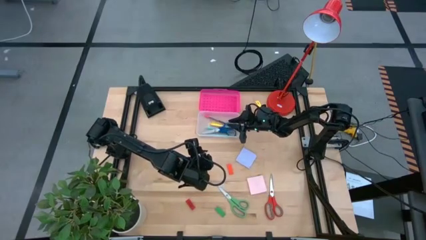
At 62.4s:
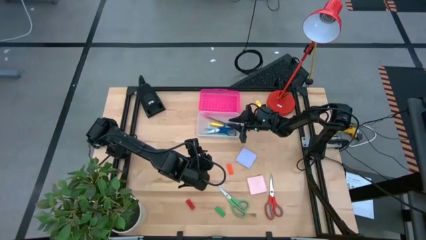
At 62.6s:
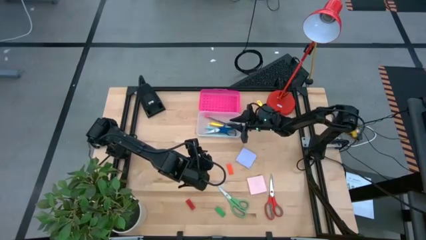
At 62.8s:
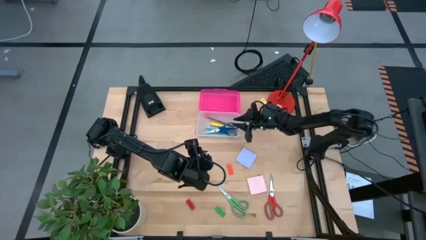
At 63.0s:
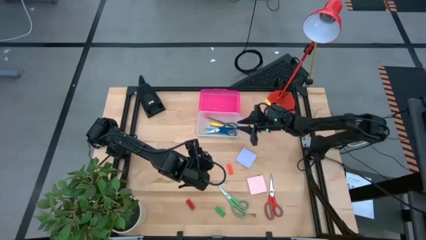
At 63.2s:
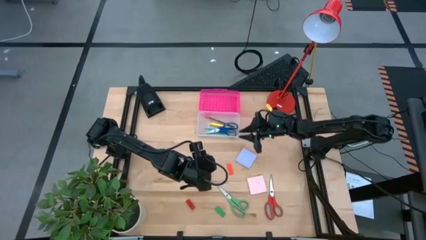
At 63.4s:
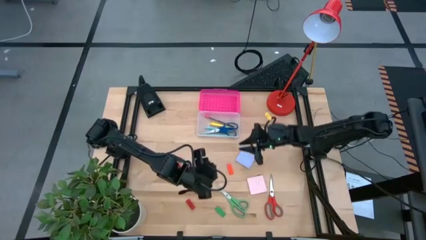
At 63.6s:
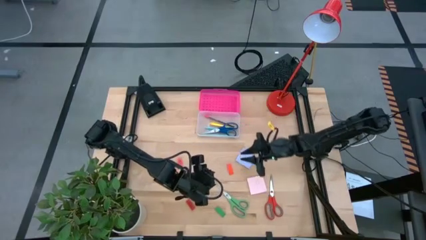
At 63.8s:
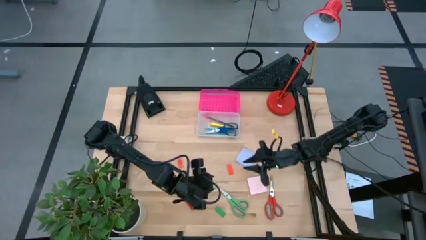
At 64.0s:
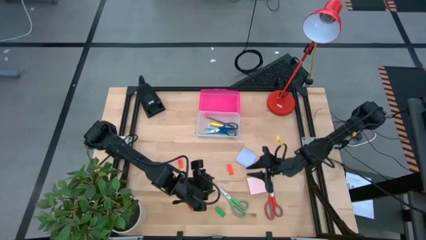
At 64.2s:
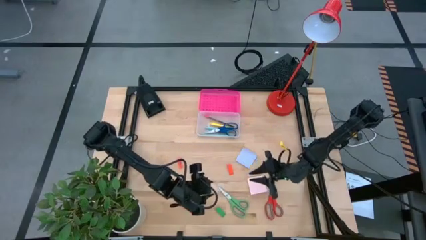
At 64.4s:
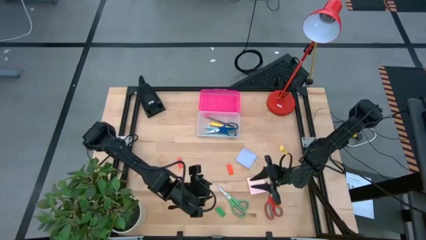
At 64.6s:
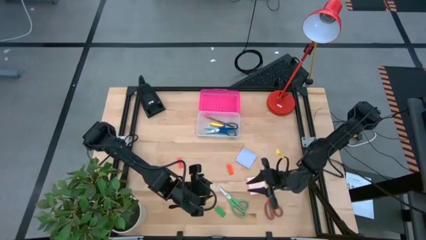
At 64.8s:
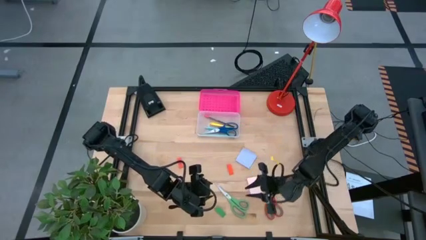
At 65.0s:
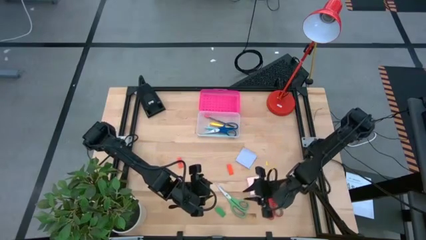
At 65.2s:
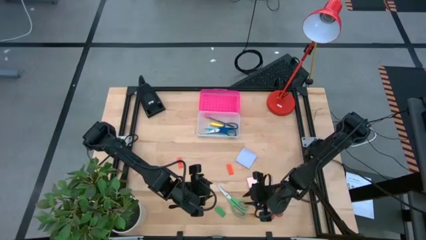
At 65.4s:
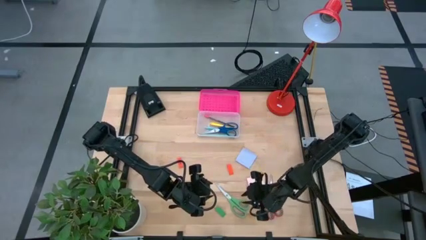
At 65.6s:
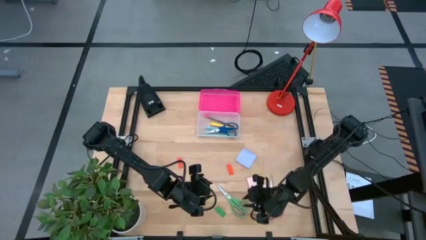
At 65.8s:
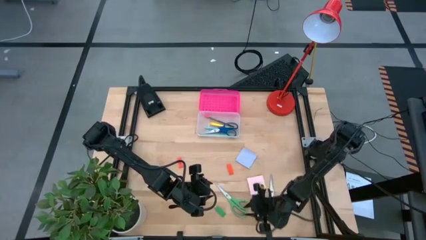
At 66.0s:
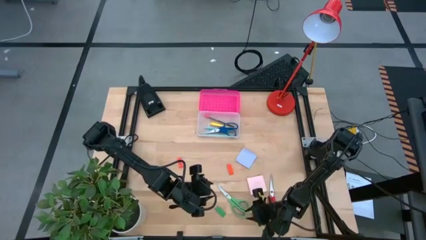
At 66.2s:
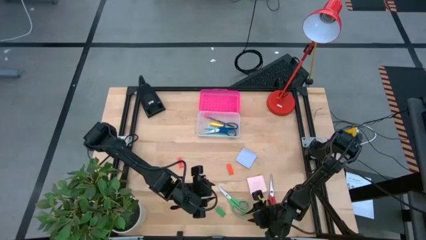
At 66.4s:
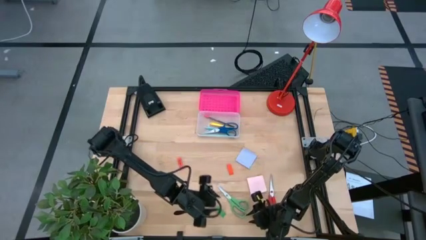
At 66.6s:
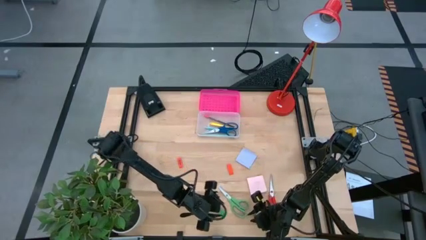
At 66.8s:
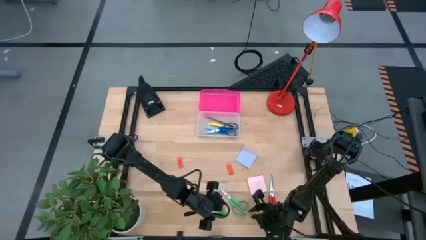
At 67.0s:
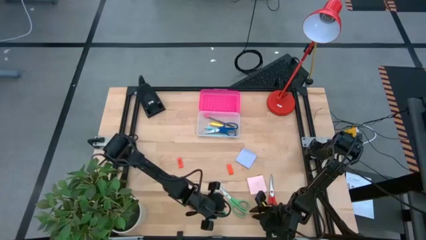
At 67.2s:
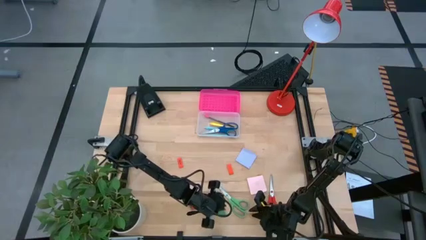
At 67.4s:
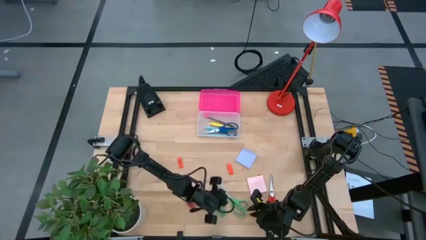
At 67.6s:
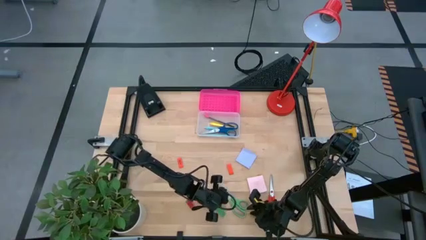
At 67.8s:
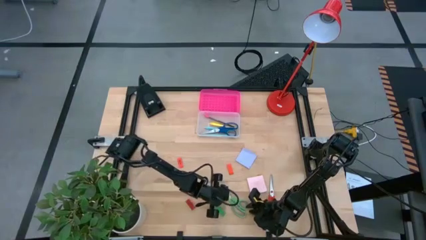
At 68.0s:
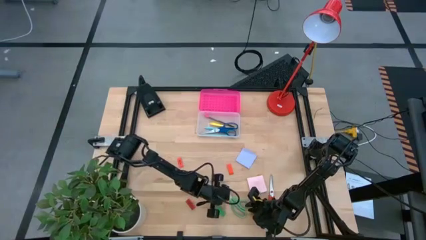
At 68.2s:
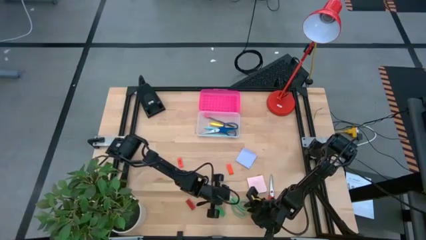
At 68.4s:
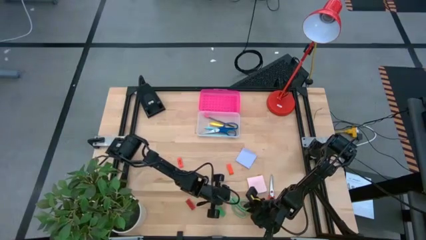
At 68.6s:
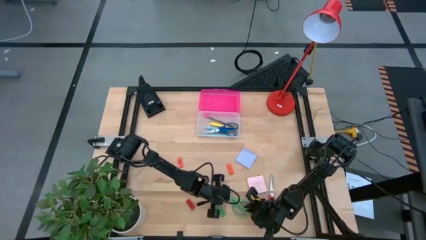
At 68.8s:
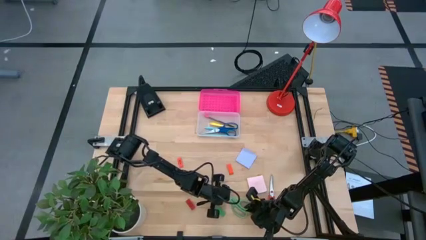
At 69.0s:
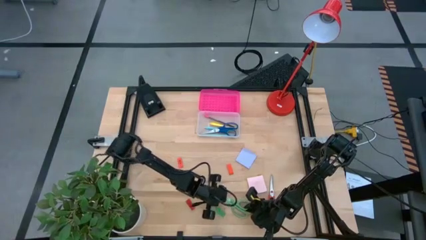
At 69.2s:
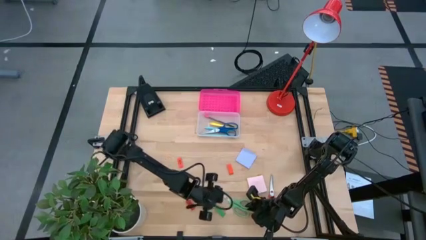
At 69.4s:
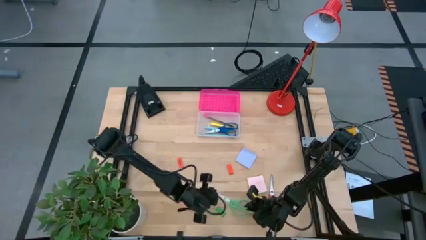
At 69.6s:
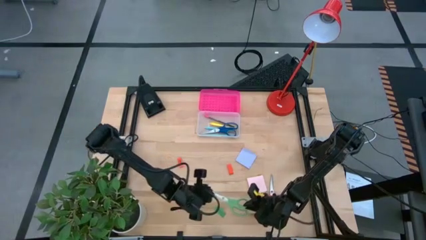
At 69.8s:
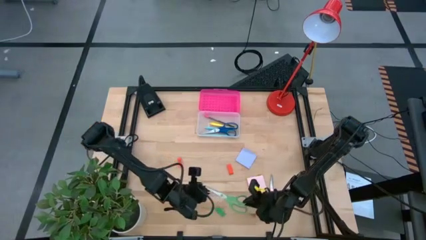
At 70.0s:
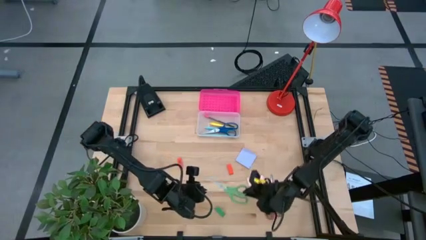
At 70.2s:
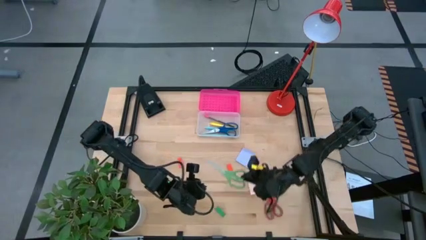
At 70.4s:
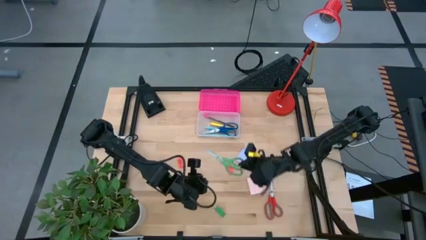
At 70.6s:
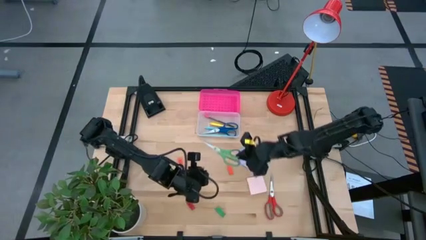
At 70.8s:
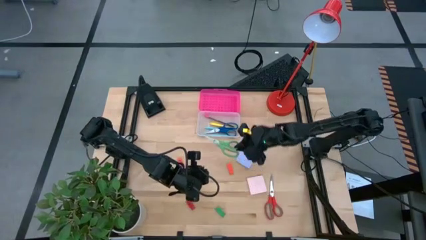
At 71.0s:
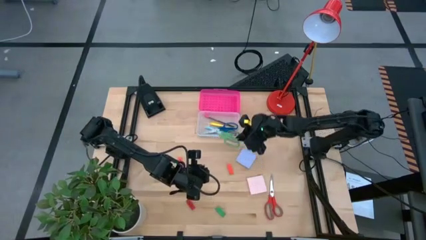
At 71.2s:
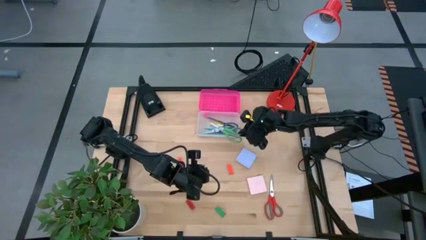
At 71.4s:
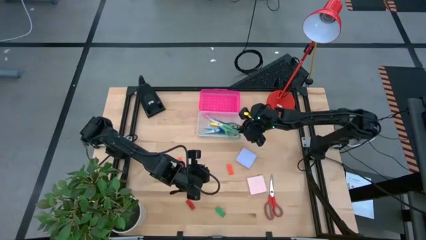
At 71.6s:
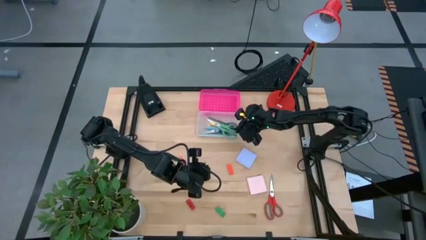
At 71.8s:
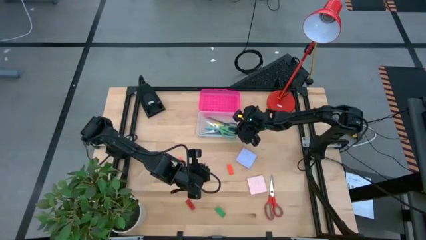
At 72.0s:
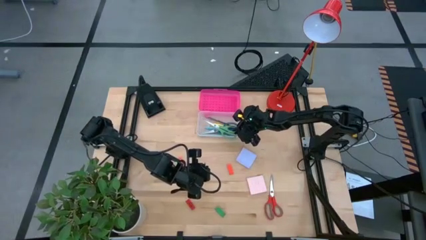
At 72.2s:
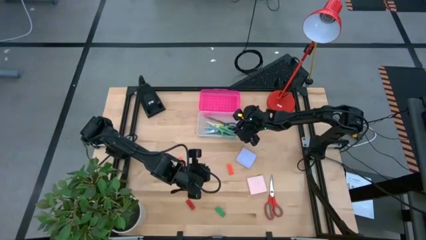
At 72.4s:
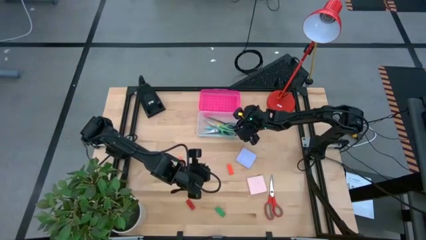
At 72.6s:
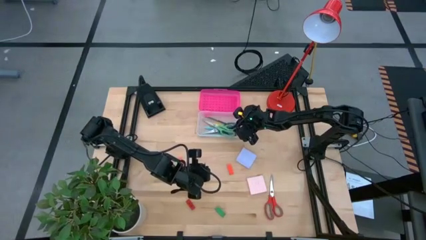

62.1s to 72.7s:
Task: Pack school essentials
Put the green scissors into the supply box

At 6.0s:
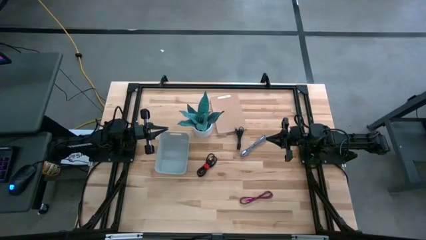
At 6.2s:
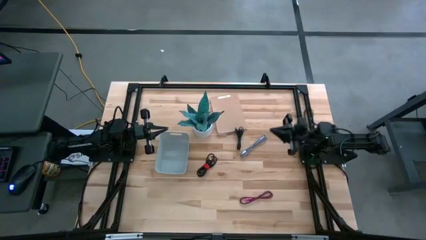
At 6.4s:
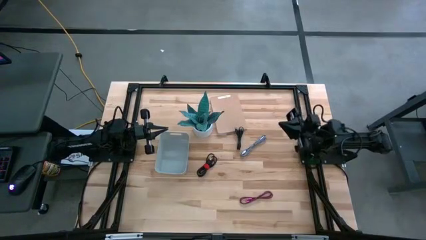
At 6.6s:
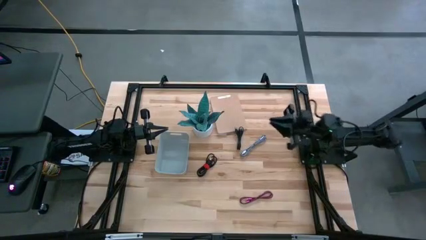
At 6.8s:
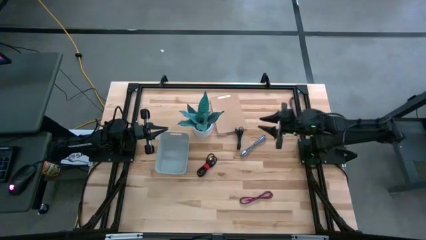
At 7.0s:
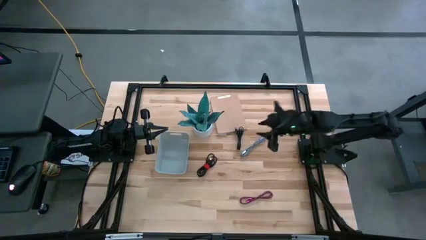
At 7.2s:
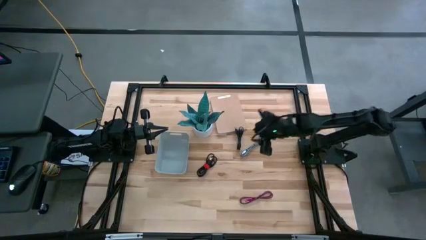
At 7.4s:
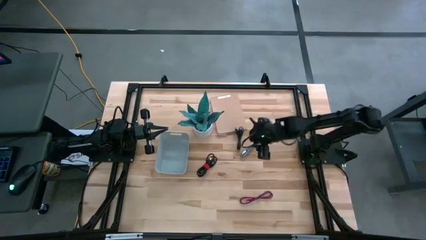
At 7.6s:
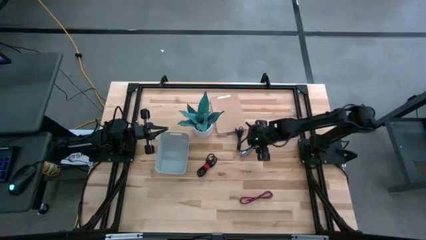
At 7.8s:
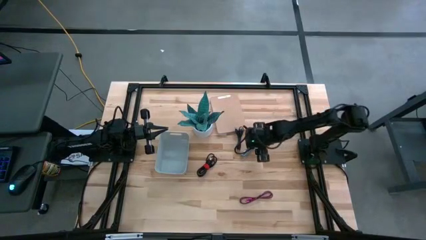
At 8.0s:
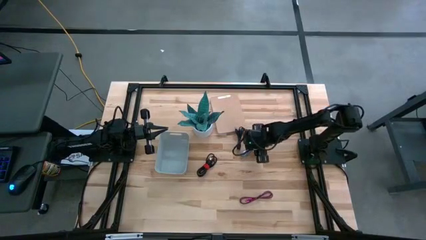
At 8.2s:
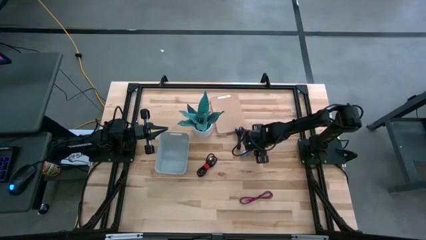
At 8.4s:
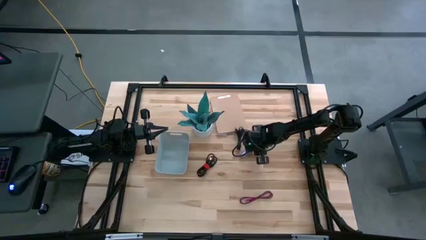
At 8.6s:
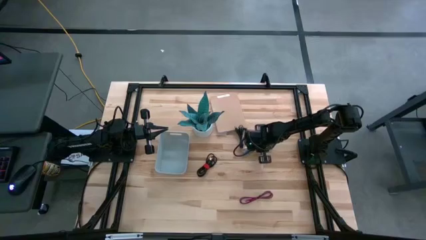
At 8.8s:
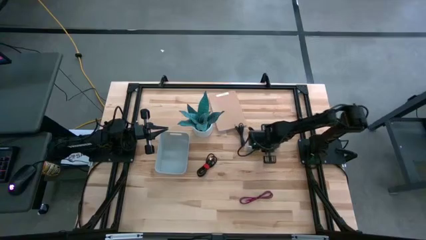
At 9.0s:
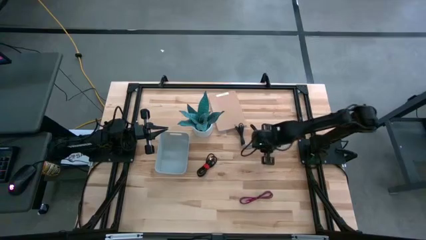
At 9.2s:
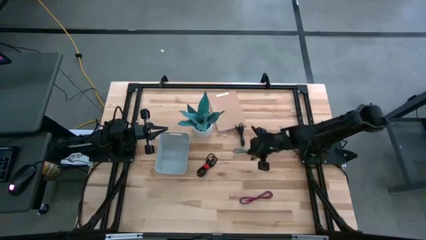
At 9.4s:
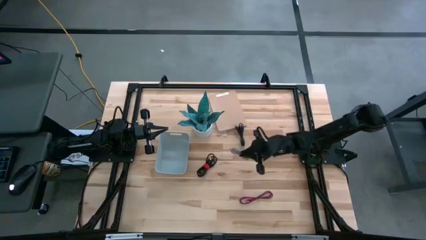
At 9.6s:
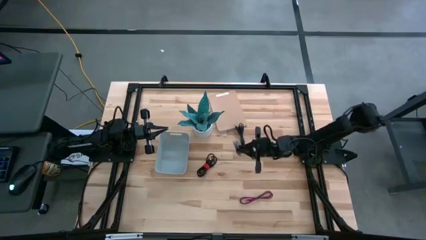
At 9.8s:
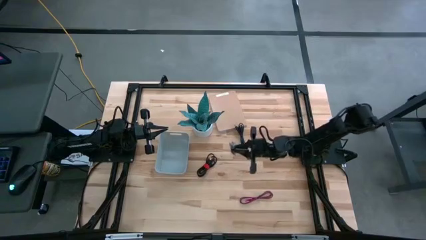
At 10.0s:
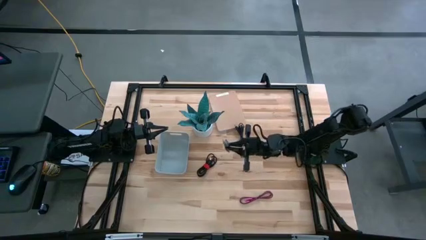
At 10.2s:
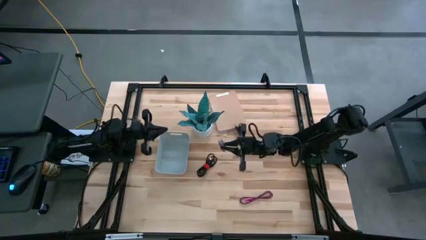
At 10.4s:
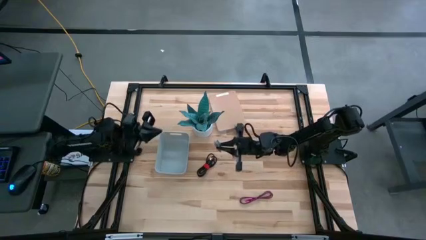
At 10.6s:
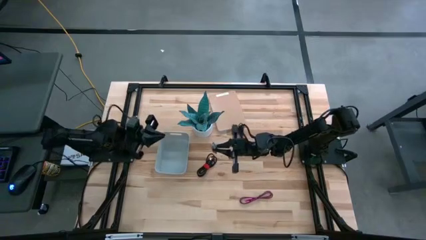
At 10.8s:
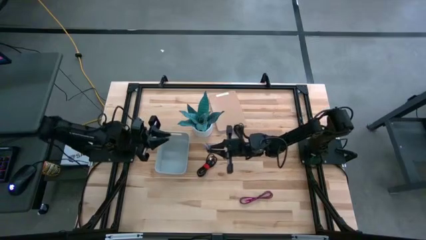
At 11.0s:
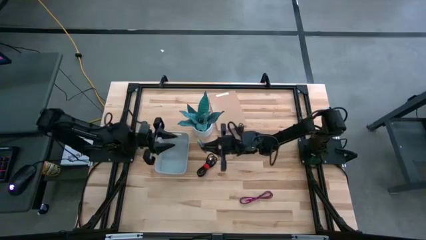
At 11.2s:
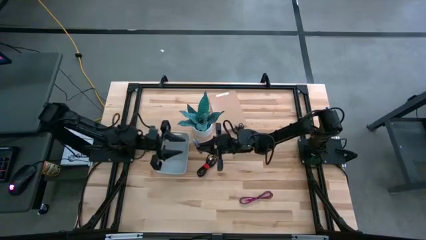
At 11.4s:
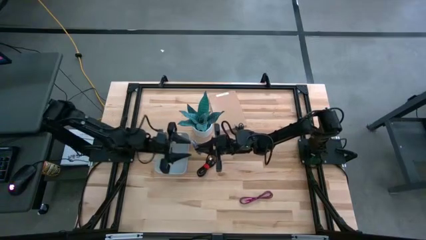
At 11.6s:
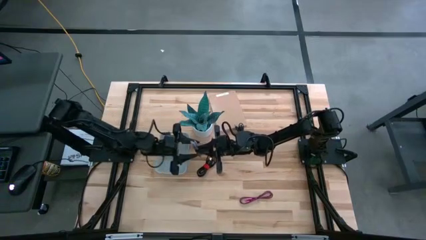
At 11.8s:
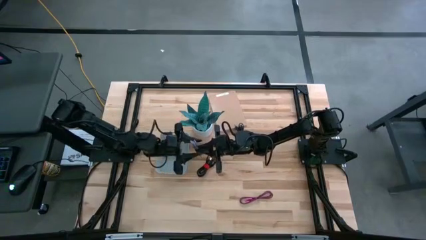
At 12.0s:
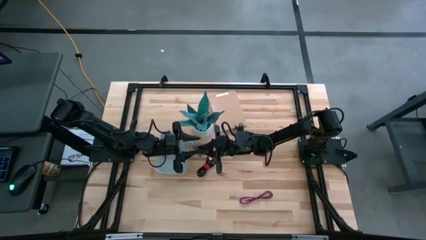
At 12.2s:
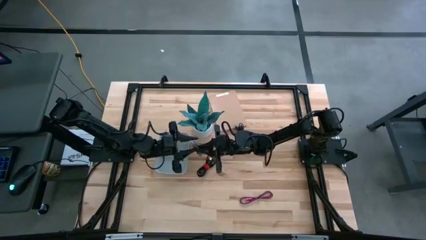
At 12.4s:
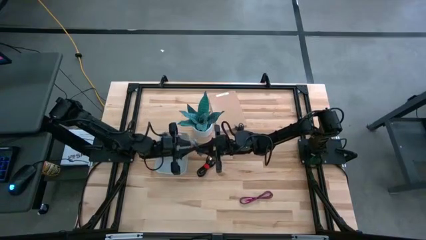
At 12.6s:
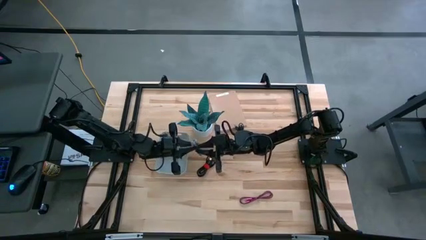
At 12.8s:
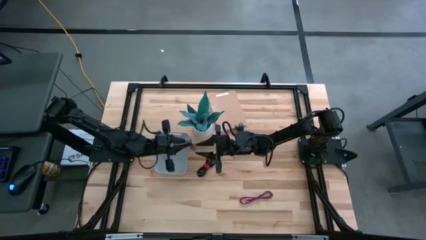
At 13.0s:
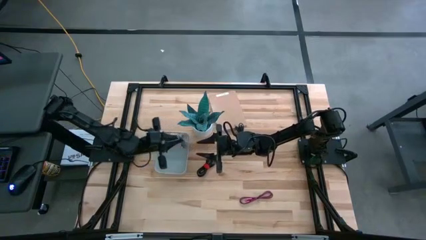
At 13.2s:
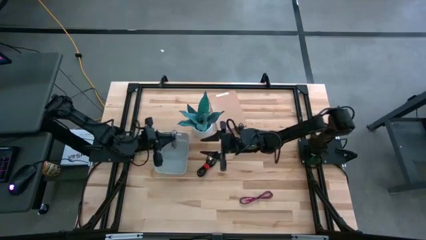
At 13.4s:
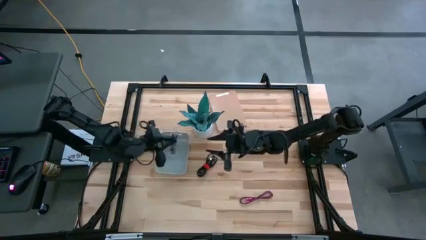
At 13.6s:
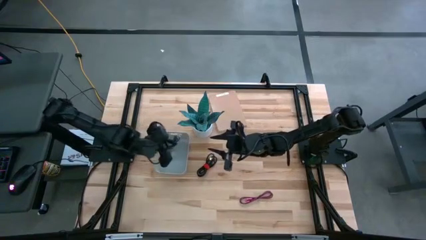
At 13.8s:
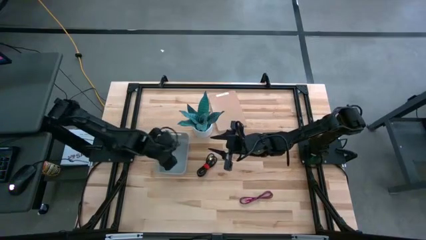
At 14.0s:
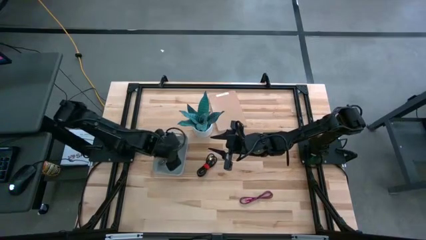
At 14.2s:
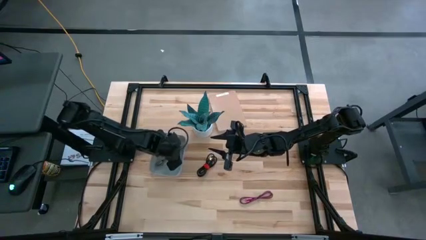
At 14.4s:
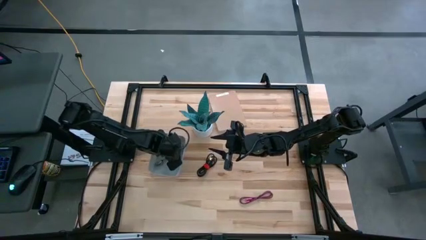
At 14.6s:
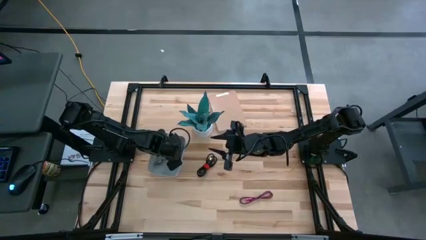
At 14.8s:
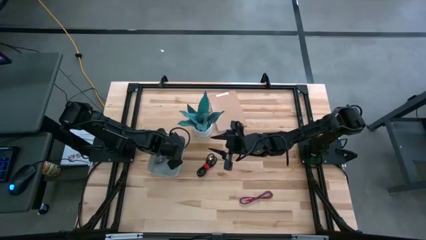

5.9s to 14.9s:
Task: Pick and place USB-C Cables
Put the white patterned into the bin
